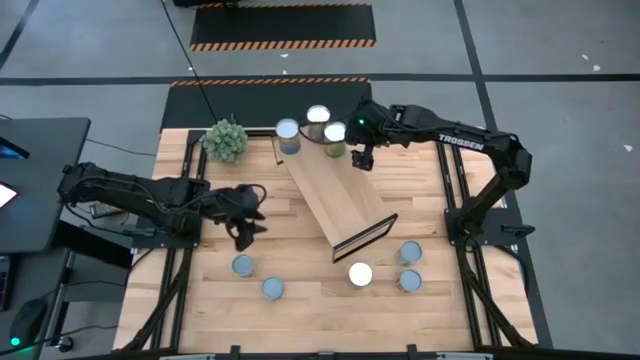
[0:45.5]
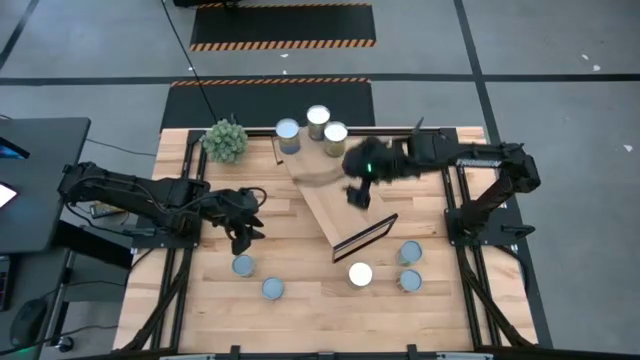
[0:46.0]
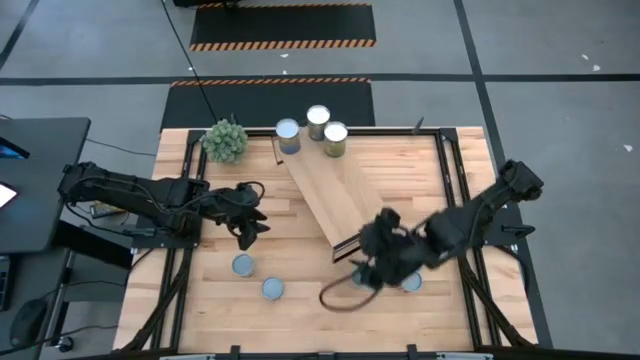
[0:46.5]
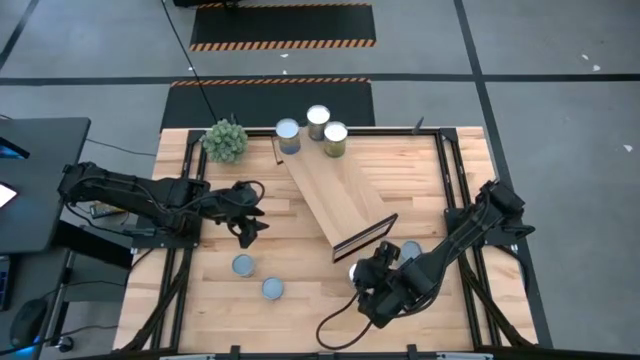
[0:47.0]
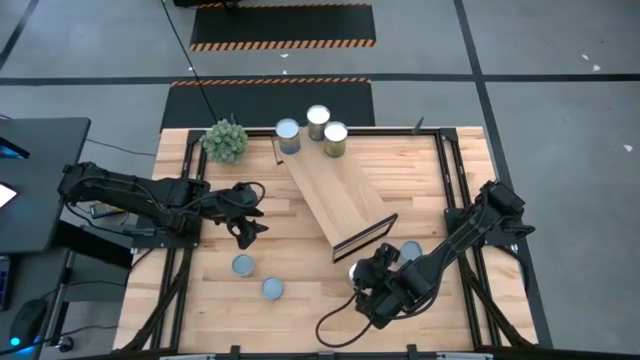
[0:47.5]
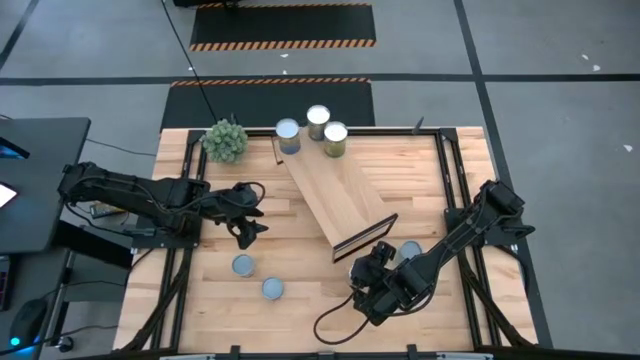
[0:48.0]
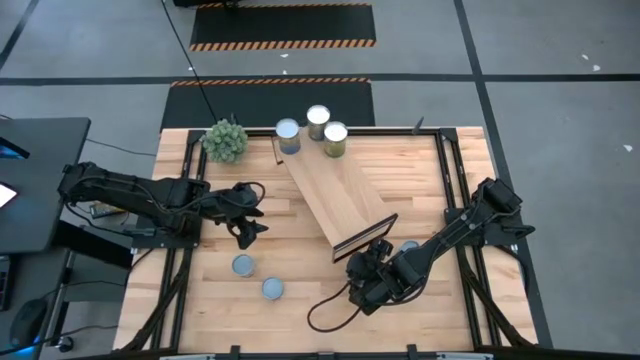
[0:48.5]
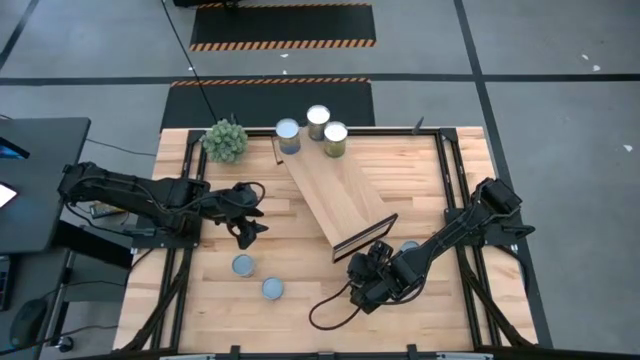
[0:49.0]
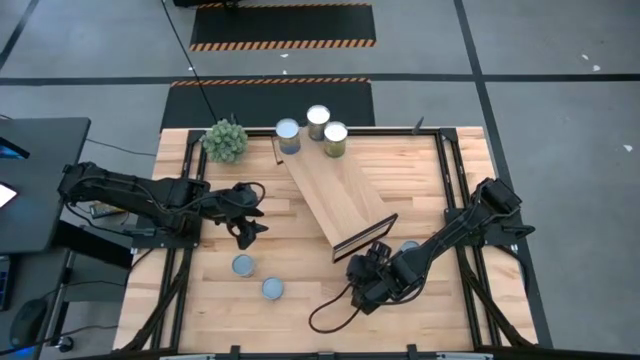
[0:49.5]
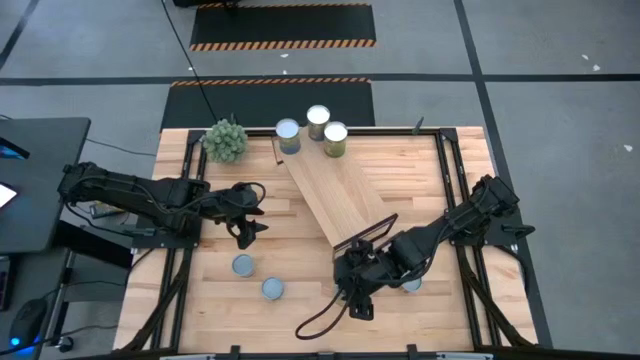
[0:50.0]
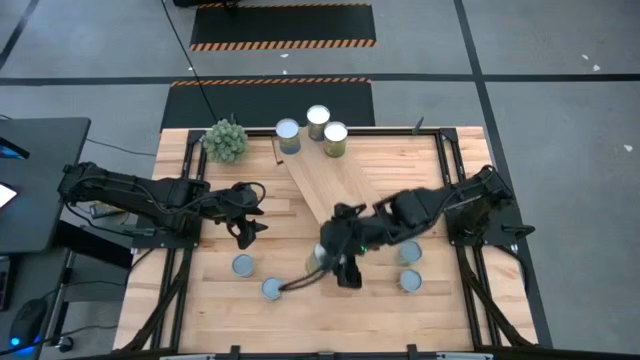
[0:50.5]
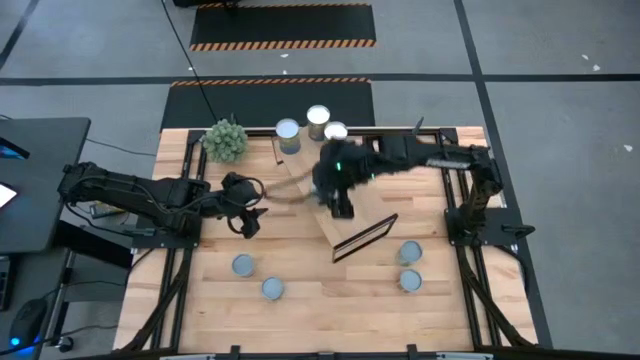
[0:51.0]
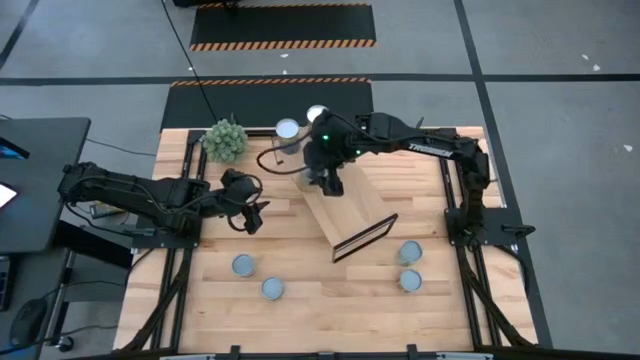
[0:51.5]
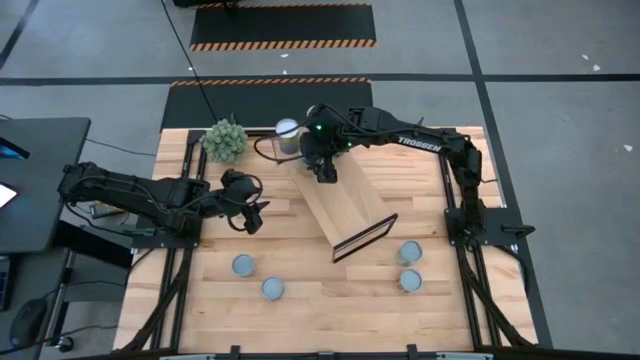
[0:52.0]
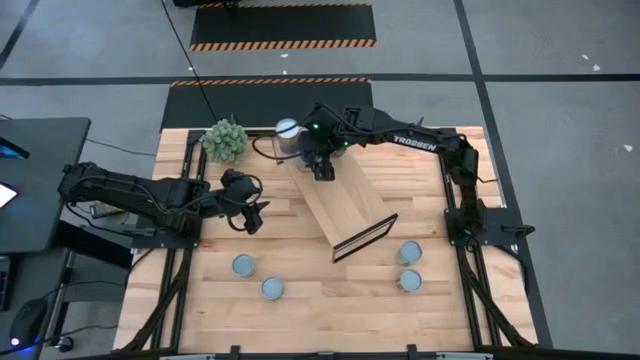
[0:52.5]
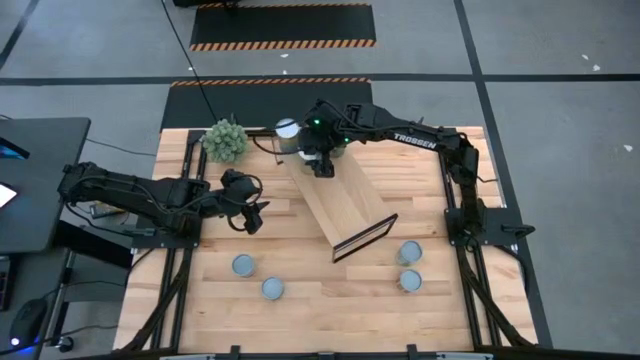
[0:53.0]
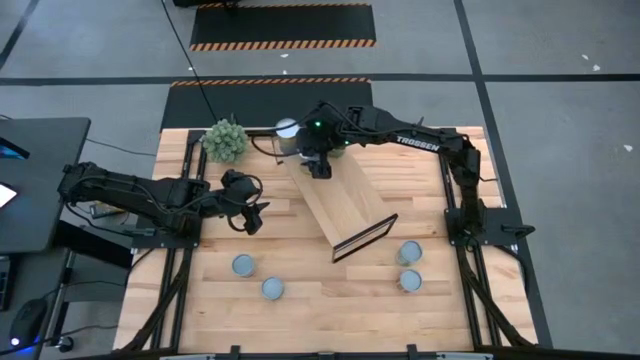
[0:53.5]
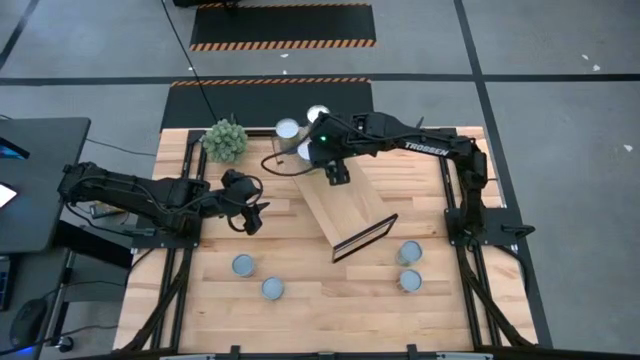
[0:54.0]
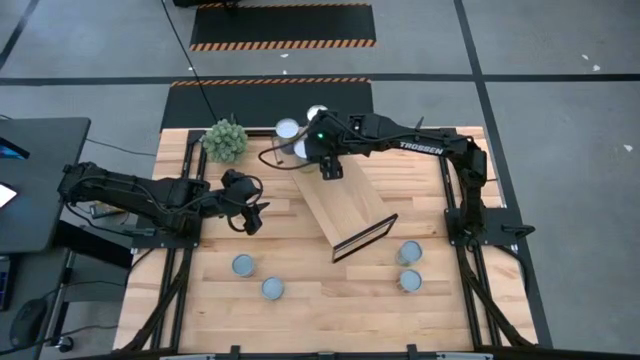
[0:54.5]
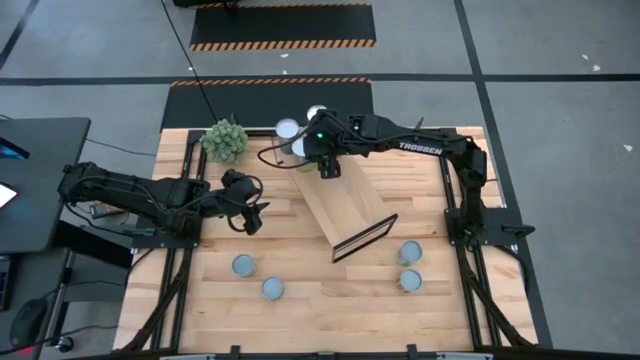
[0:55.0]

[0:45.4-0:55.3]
Task: Pick and place cans onto a shelf
Put the canned carrots on the shelf

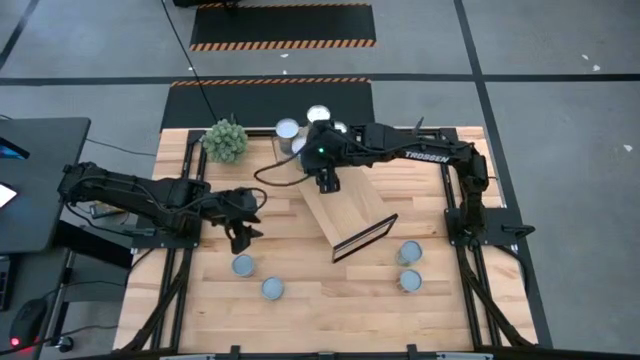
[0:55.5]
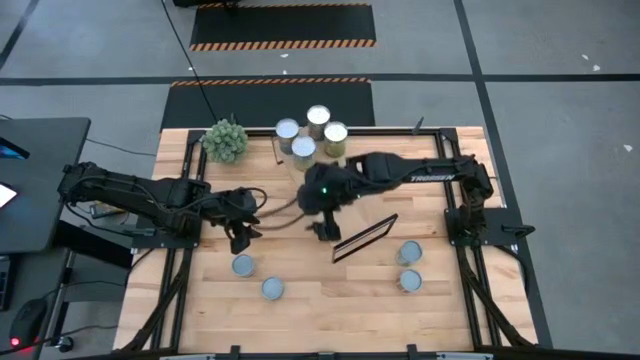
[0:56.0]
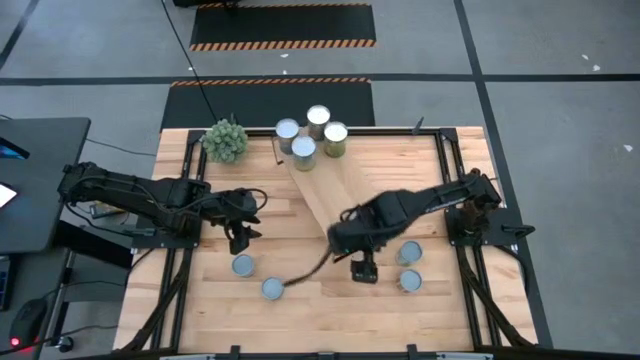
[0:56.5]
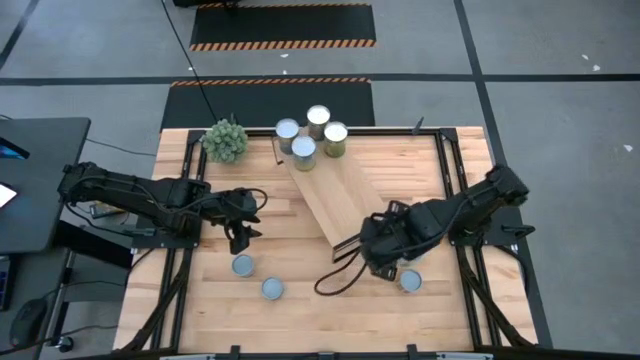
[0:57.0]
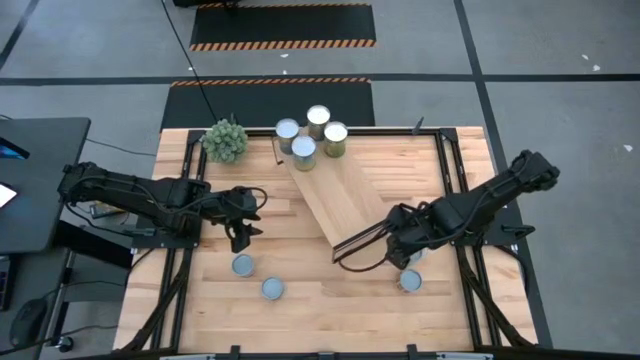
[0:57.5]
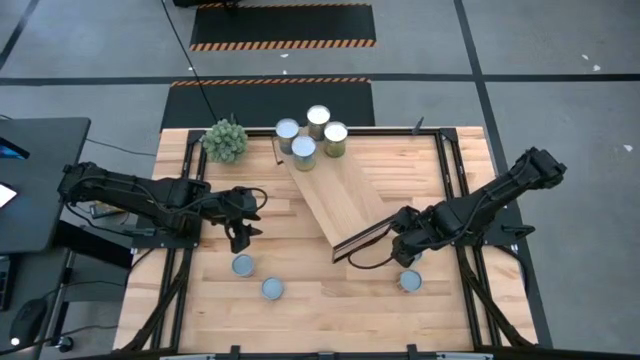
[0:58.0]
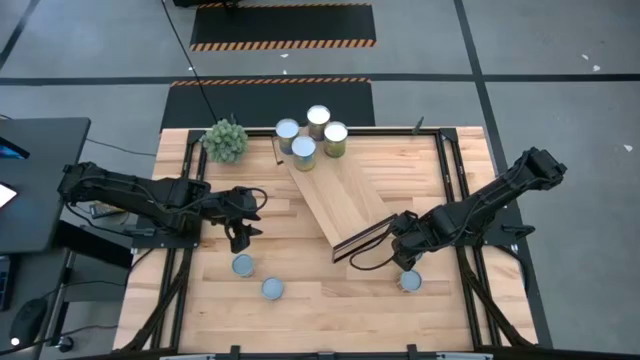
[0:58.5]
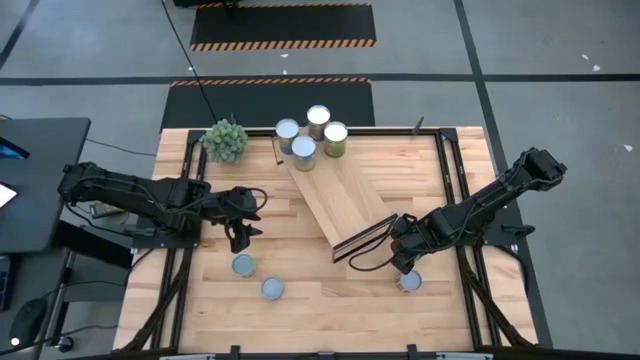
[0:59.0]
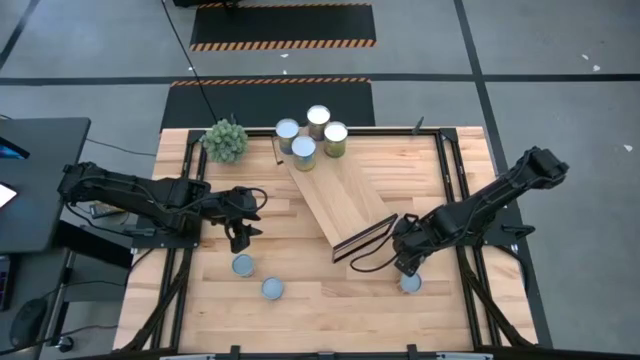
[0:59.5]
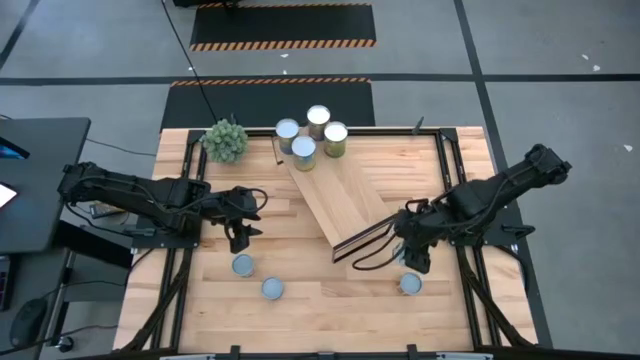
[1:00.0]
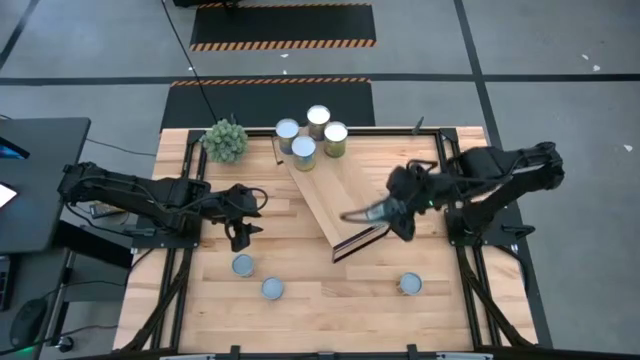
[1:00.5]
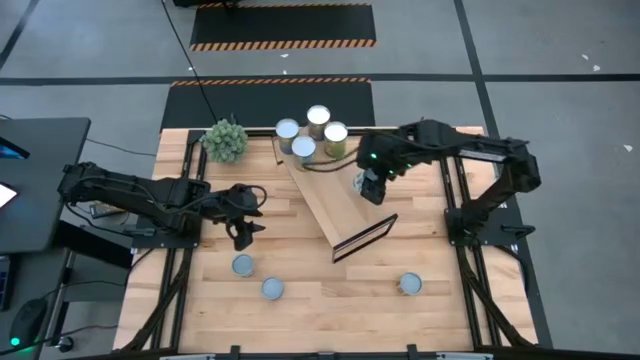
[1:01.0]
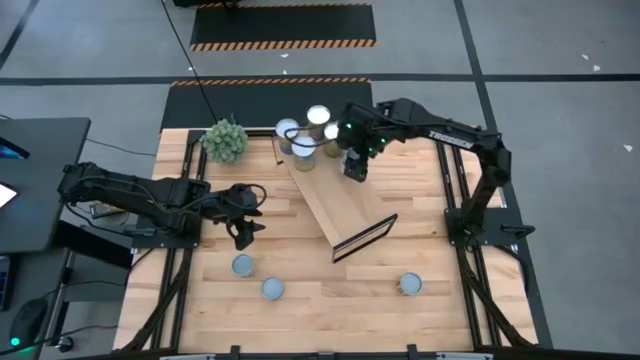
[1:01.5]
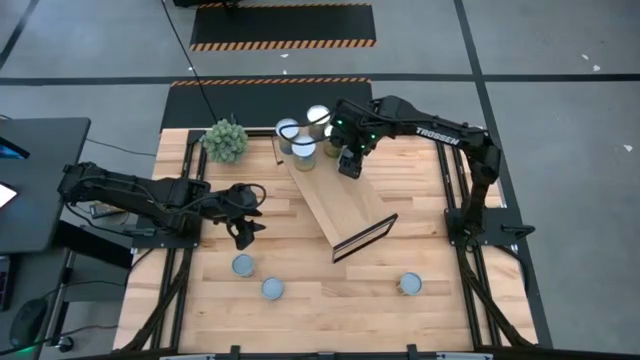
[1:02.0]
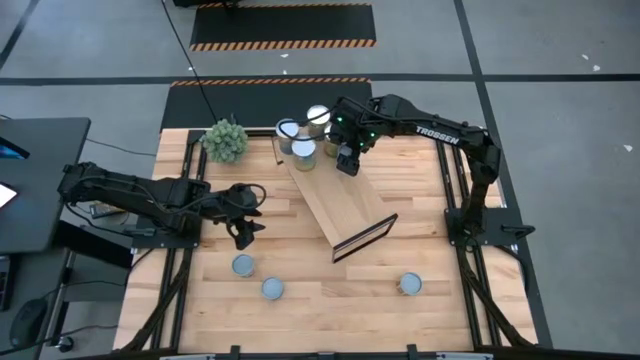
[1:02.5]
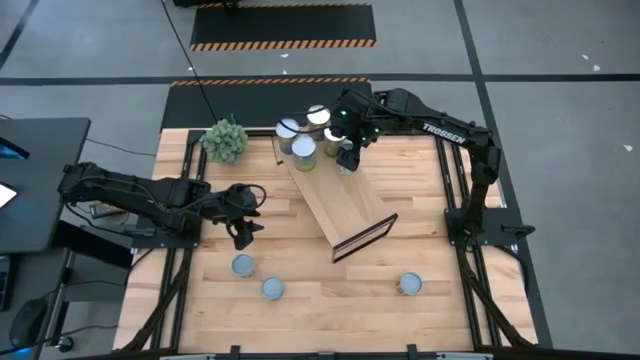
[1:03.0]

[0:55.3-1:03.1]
Put the canned mixed veggies on the shelf

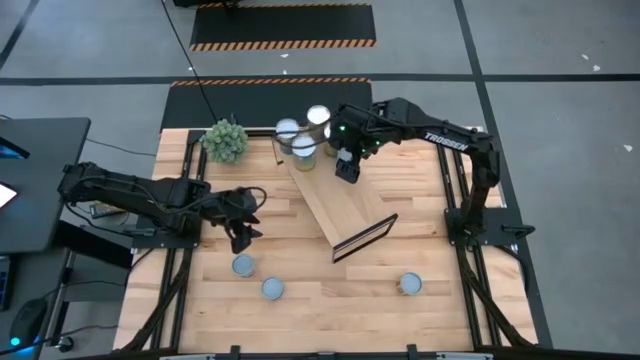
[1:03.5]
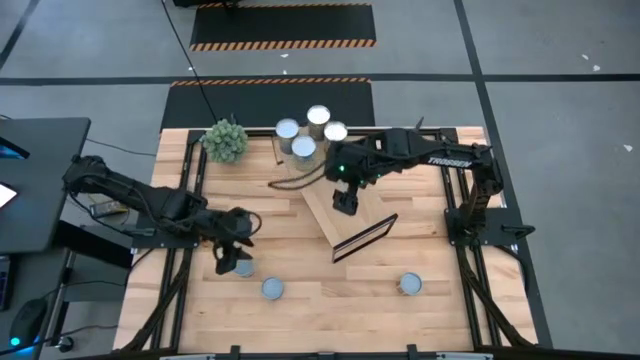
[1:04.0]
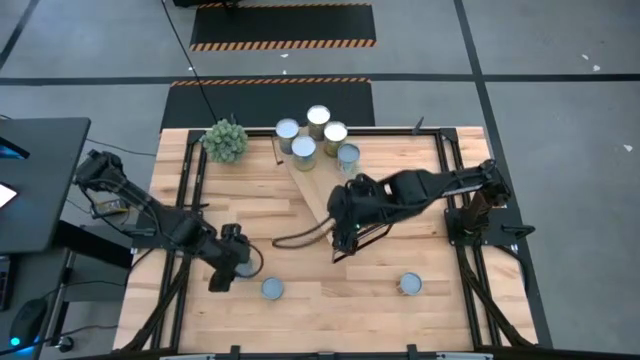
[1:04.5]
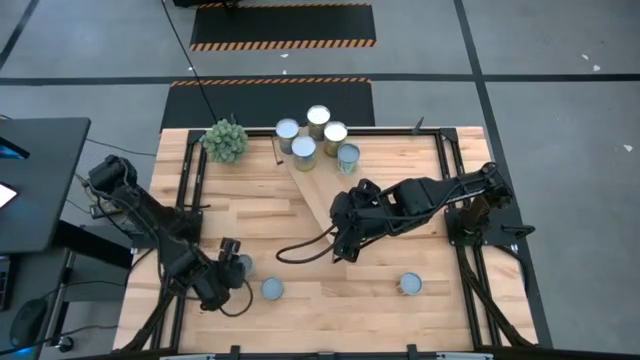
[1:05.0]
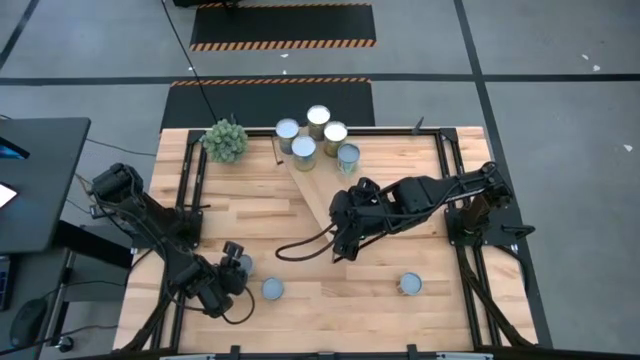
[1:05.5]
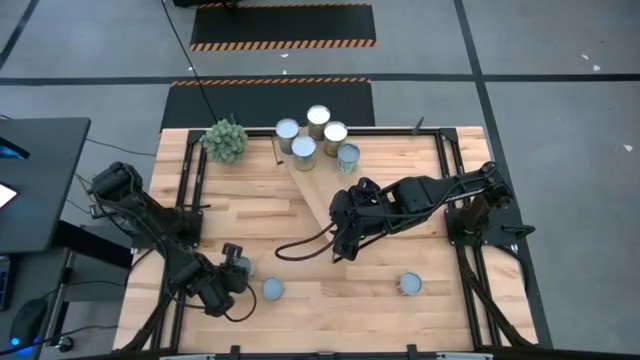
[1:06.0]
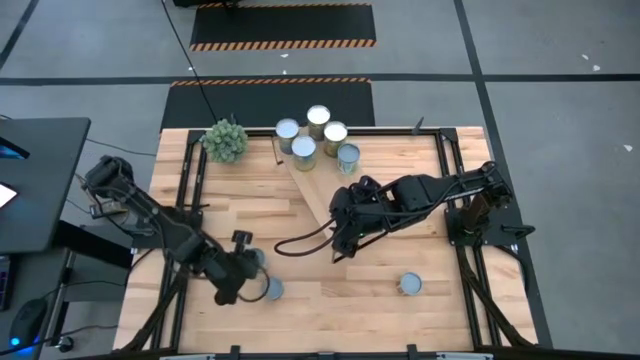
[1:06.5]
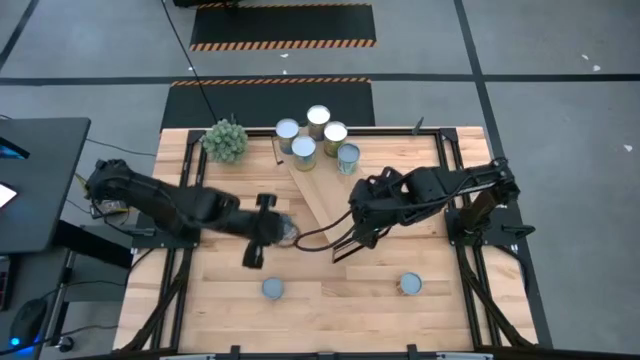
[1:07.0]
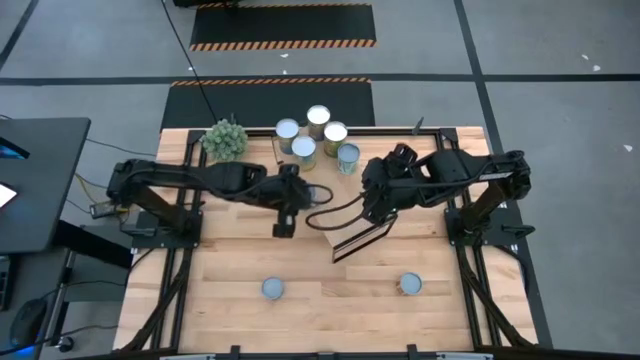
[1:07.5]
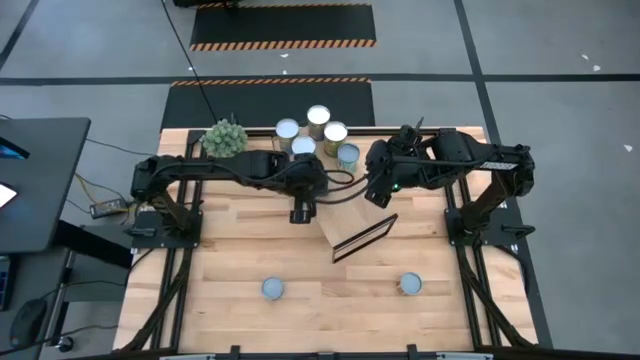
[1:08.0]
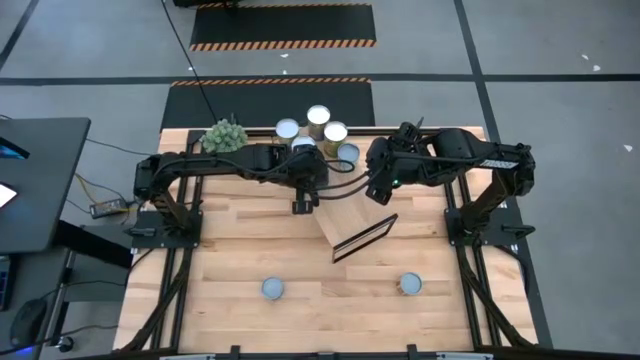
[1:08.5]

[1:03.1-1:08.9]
Put the canned peas on the shelf
